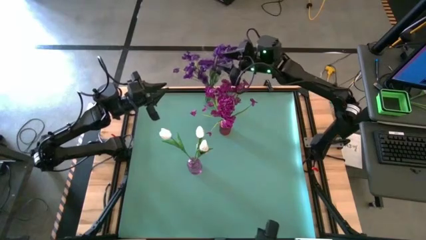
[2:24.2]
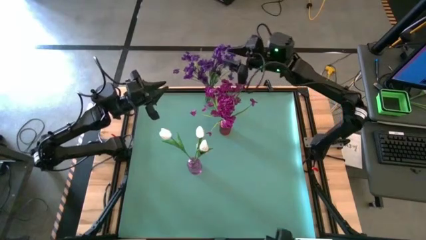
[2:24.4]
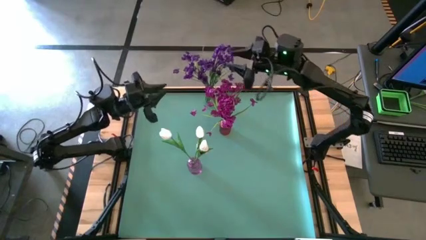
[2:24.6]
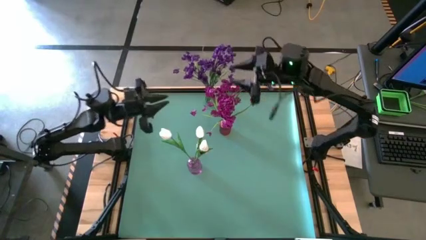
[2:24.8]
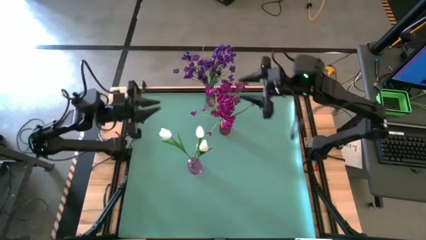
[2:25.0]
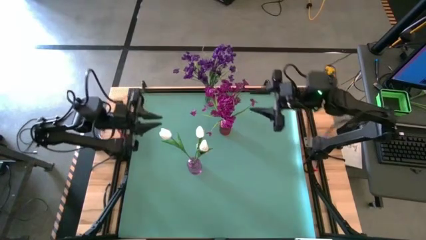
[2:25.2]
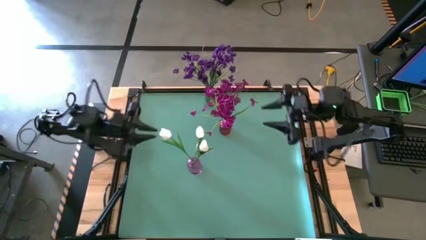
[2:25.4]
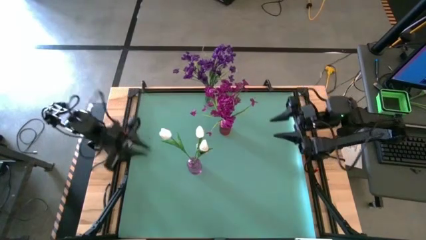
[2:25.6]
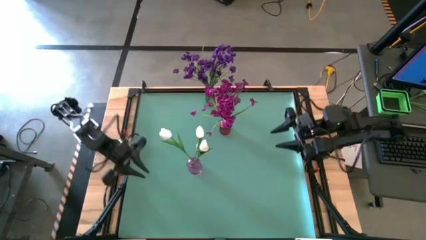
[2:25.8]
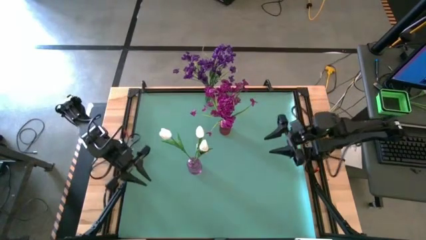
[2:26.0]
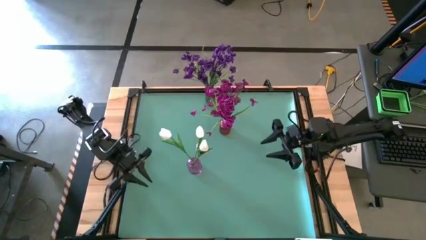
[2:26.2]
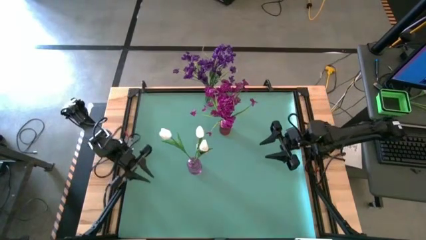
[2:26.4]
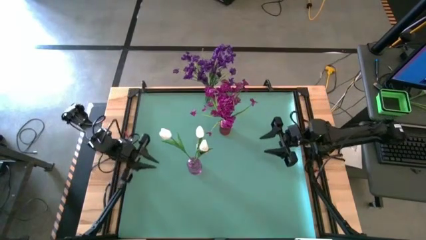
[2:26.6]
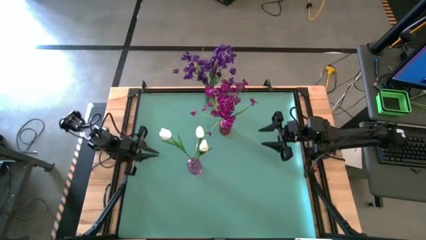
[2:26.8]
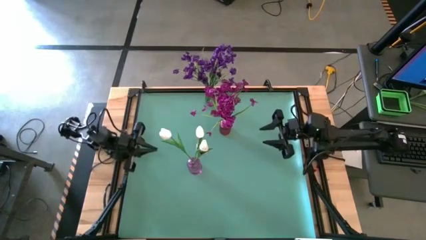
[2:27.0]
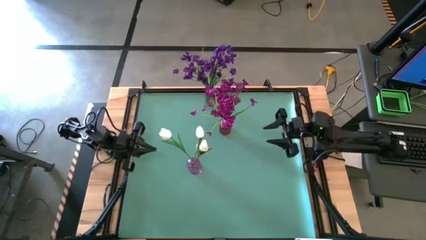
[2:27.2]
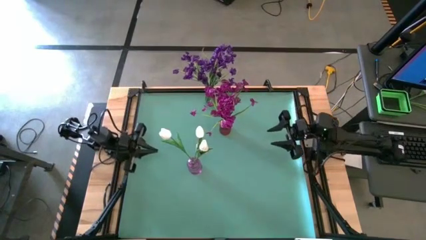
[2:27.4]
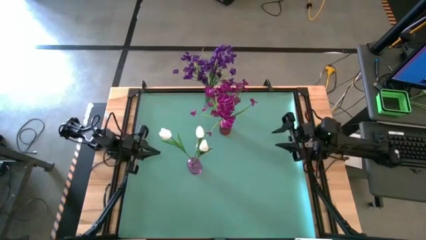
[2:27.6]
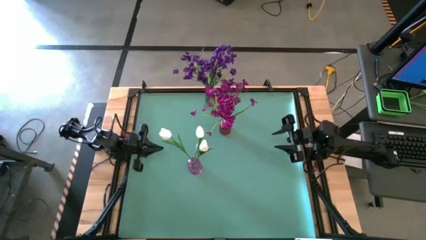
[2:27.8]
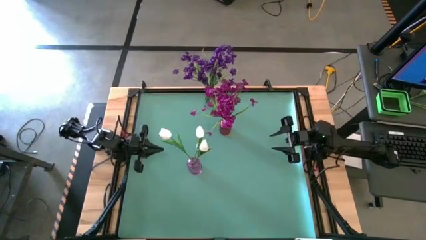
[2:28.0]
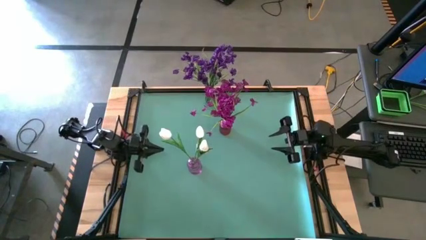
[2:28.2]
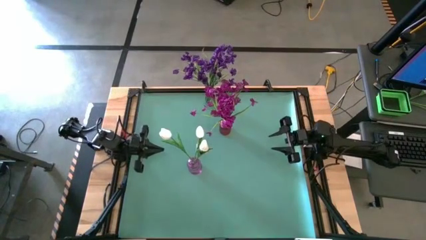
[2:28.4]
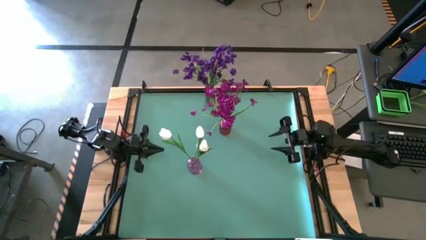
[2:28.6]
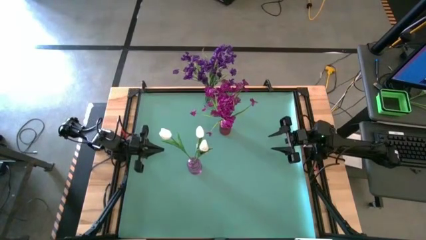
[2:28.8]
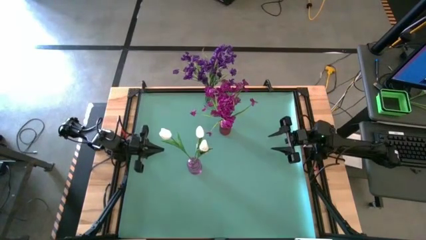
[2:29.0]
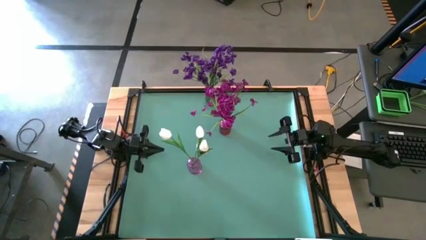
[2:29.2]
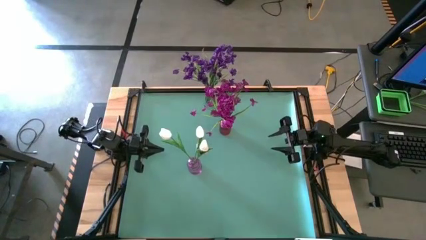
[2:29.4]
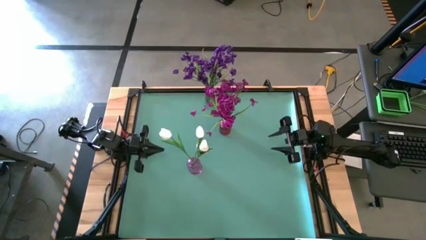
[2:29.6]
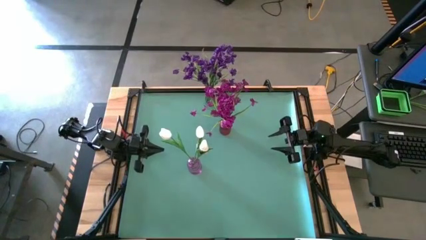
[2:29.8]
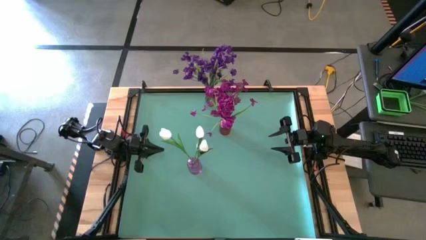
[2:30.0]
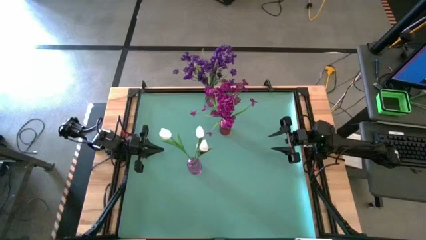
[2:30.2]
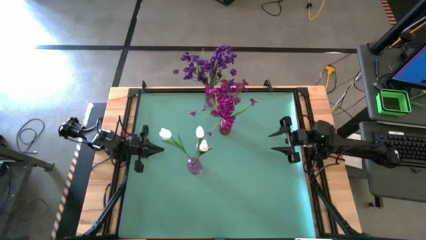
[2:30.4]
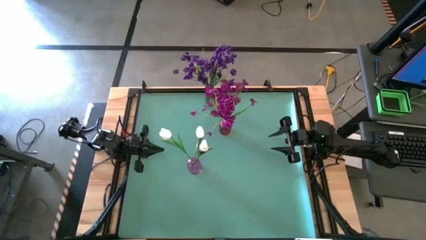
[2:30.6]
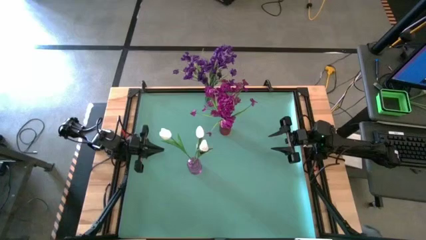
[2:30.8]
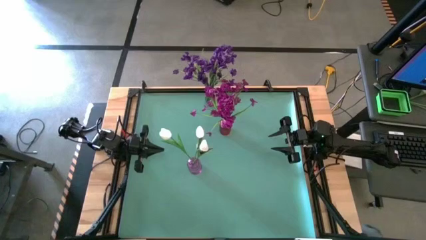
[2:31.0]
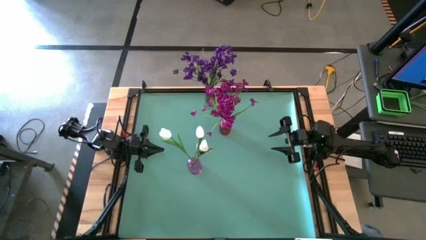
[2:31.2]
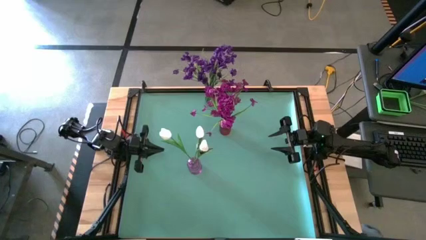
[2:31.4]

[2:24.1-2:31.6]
Task: Sort flowers into vase by color
Return to Home Position

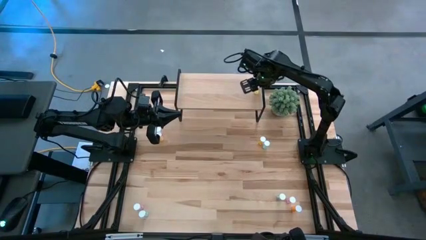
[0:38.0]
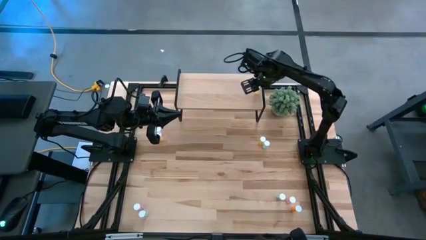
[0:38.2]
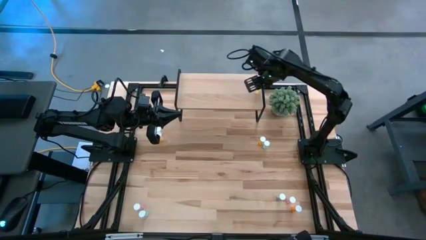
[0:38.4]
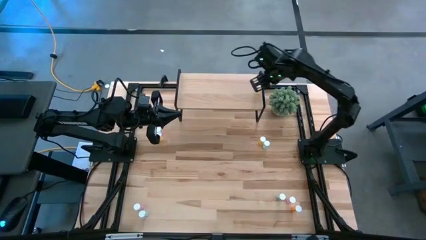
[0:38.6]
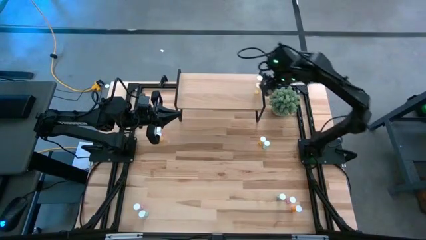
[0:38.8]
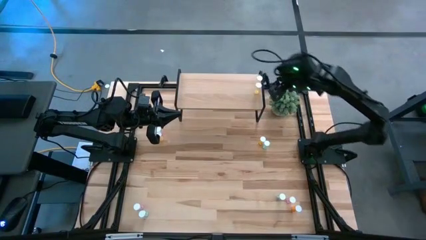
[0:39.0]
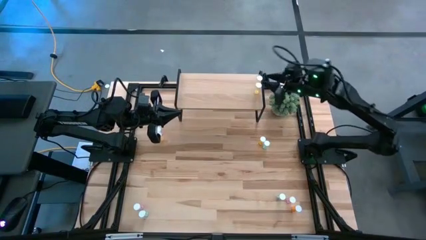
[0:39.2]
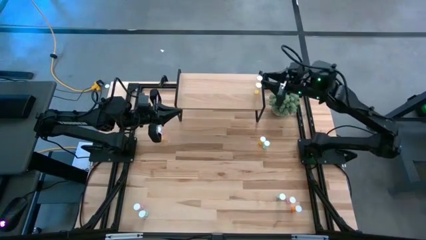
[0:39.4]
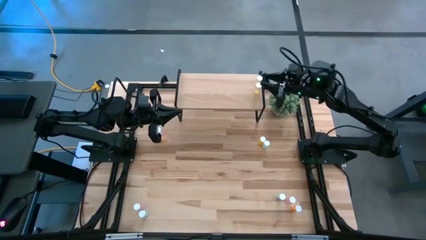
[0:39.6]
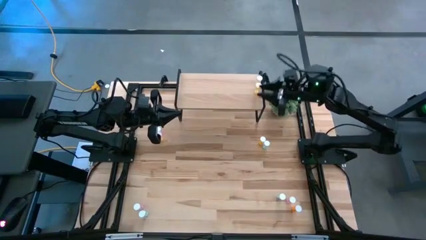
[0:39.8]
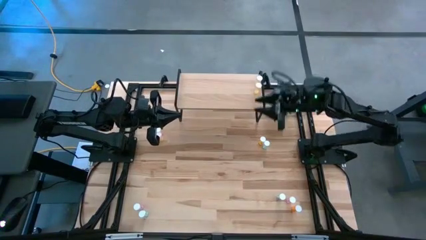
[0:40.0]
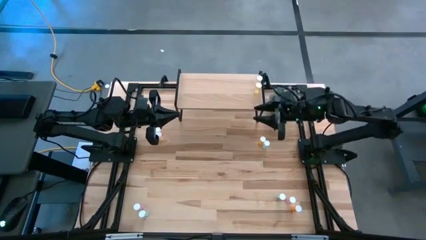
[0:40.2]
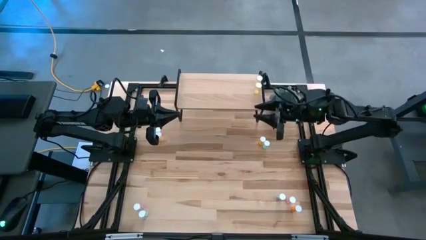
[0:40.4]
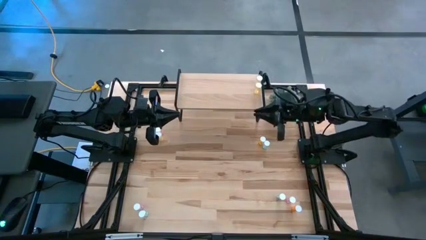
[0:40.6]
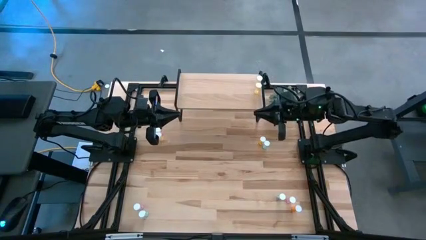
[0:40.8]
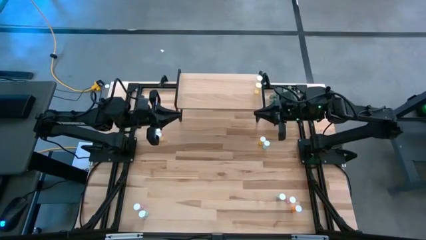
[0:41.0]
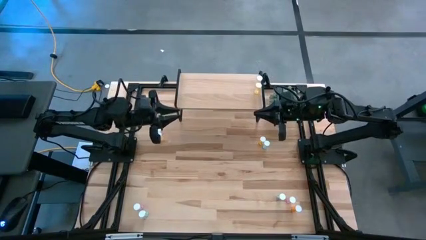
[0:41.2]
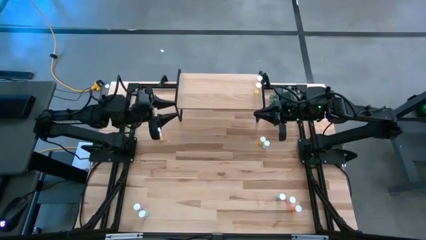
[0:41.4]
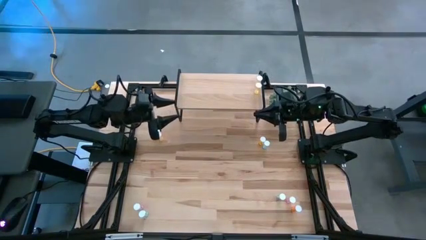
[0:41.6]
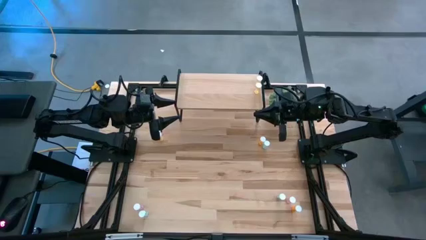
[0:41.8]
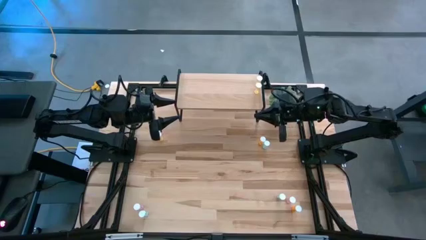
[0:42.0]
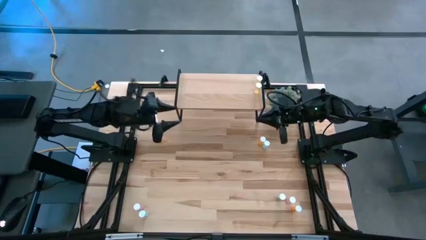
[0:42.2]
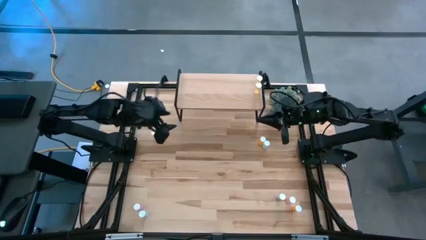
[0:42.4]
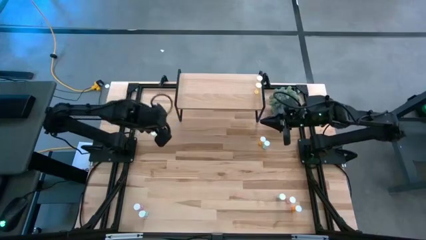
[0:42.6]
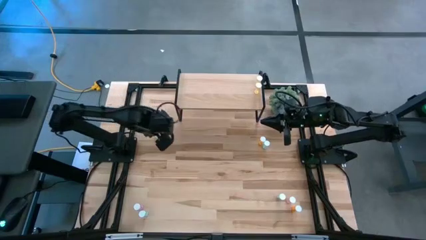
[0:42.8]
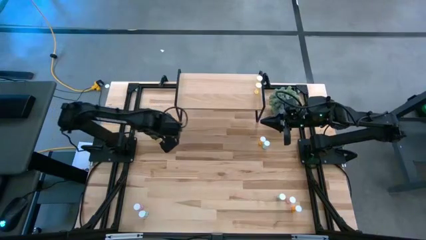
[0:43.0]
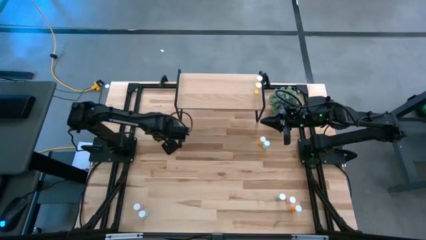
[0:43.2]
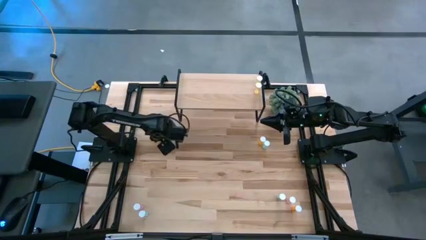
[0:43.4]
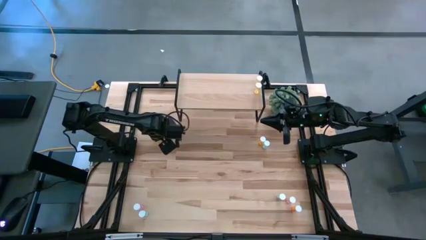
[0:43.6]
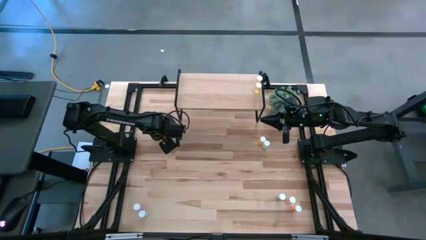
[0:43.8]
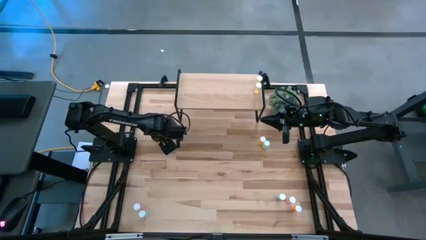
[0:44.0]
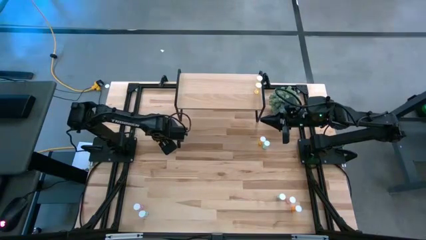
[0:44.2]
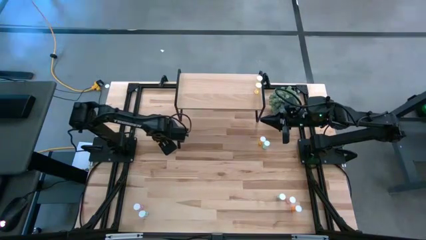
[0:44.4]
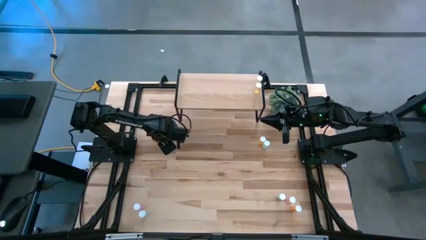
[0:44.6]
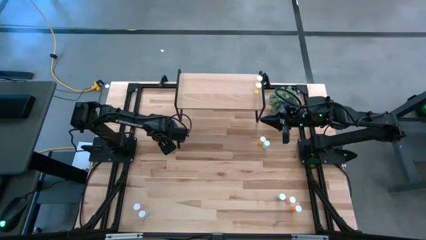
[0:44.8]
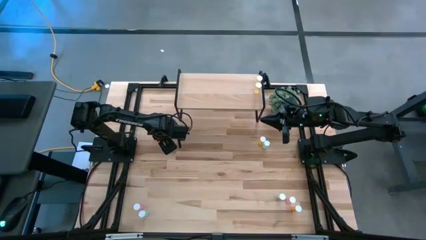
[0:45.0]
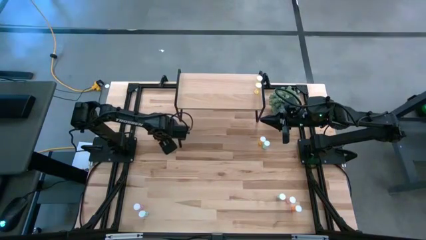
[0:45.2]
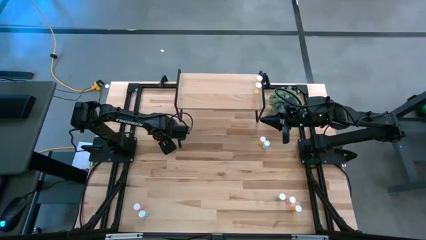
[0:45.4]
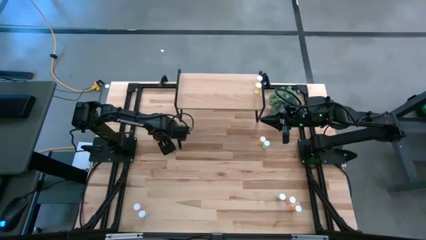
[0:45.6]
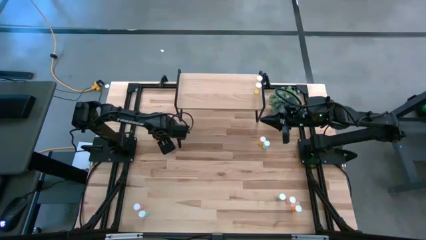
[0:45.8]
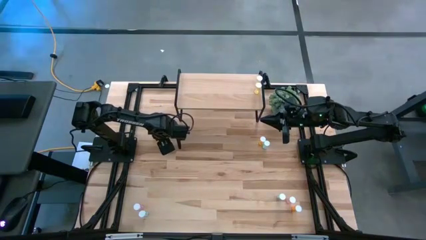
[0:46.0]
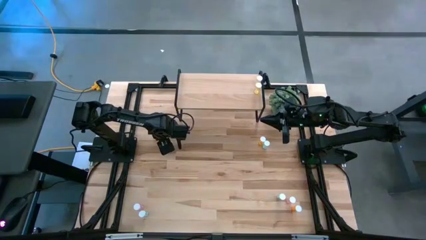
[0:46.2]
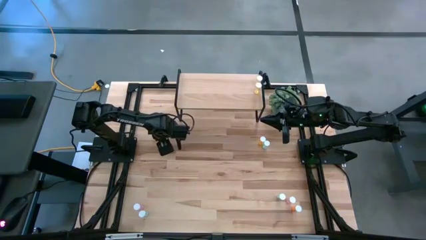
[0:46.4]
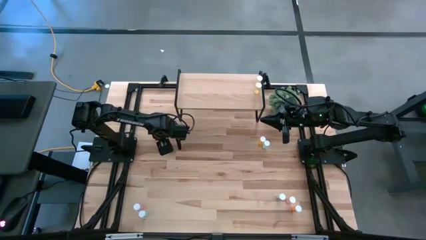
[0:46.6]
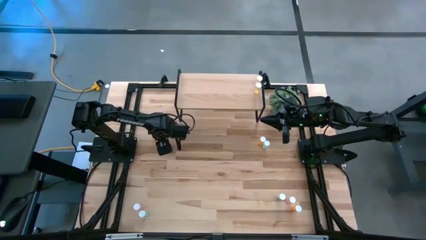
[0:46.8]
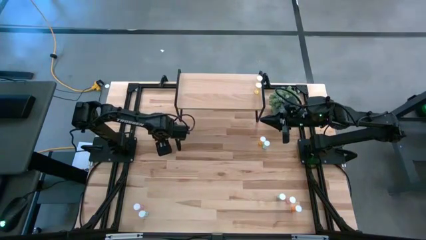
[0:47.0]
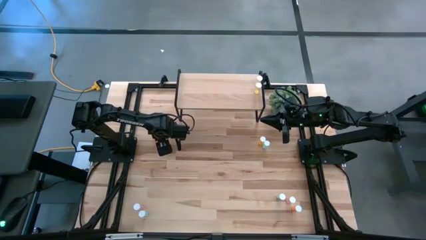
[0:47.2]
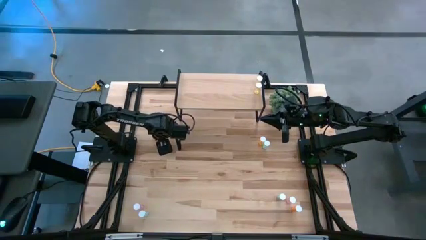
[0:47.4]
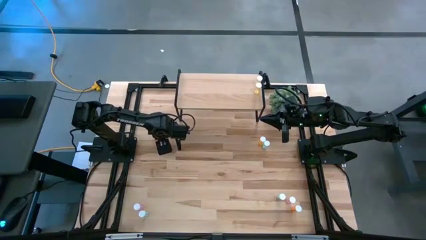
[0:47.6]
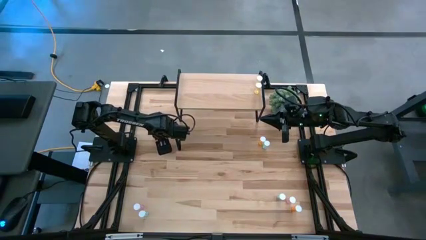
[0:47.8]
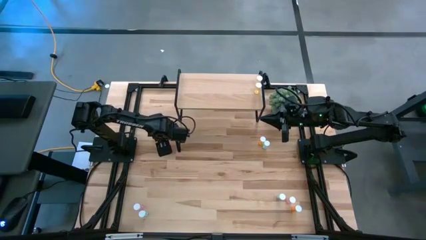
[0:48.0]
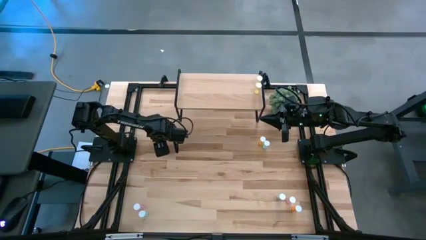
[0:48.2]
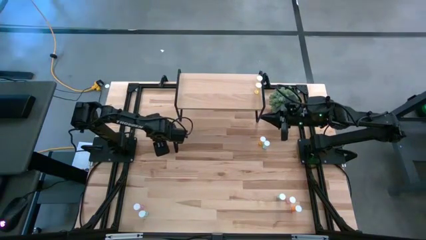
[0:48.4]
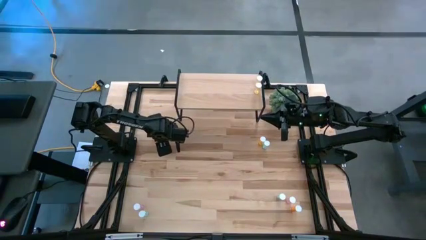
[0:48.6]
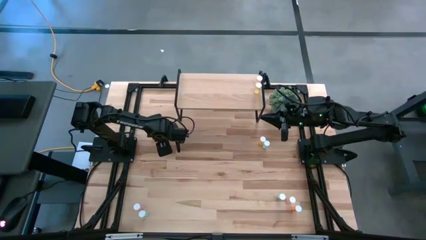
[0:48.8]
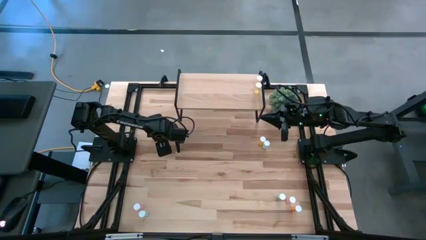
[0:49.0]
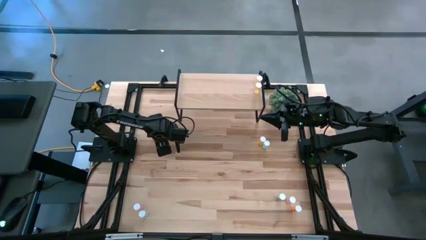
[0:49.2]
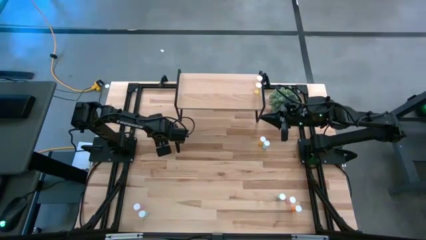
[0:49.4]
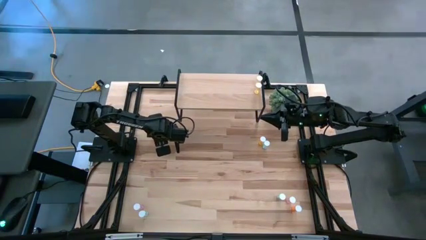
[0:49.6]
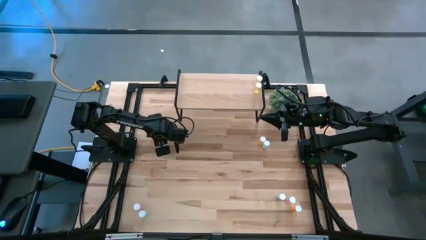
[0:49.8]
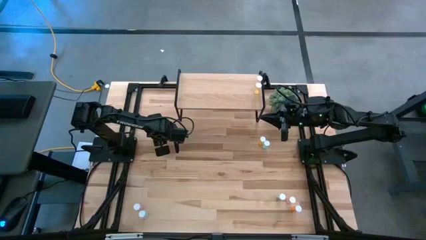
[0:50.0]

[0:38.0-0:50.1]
Task: Pick and place medicine bottles onto shelf by color
Put the yellow pill bottle on the shelf aligned with the other yellow pill bottles
